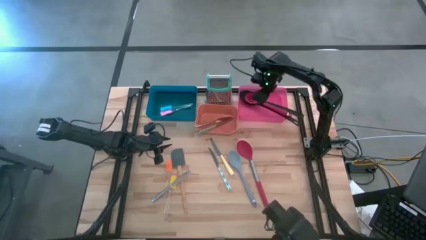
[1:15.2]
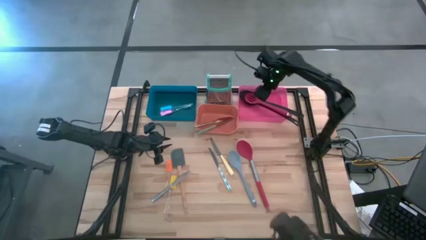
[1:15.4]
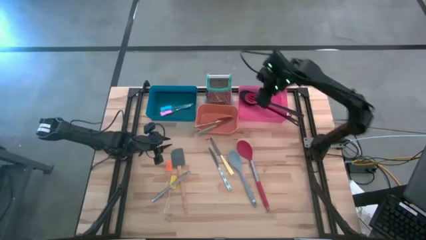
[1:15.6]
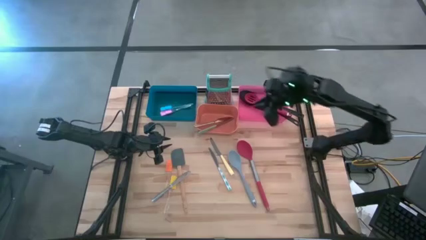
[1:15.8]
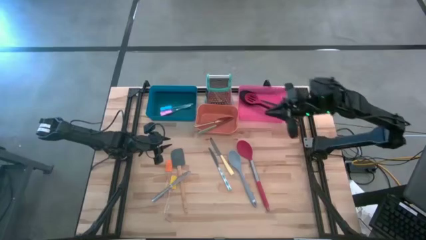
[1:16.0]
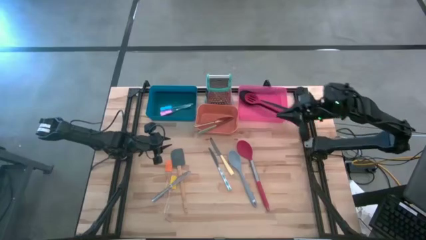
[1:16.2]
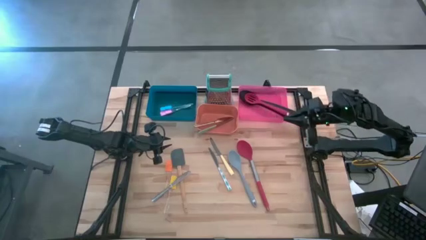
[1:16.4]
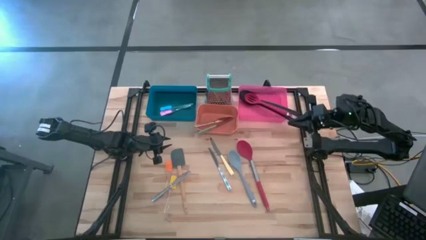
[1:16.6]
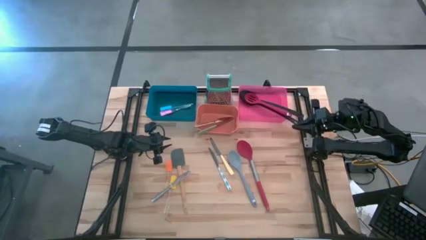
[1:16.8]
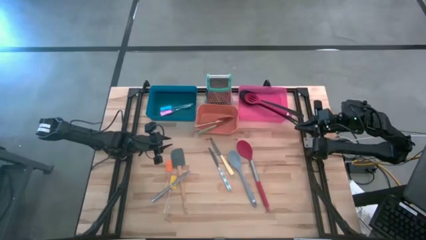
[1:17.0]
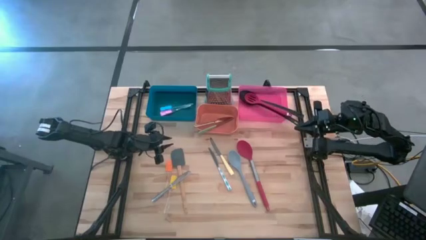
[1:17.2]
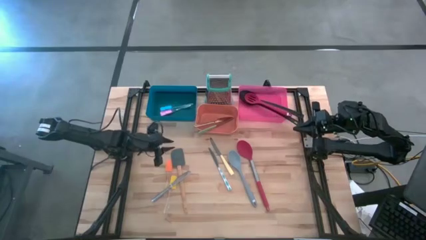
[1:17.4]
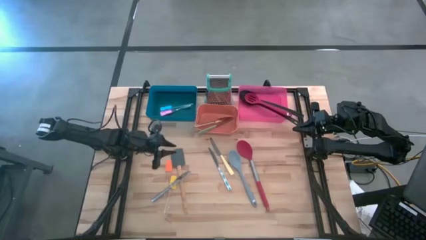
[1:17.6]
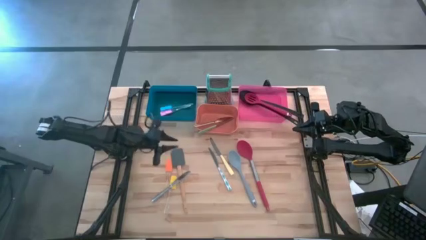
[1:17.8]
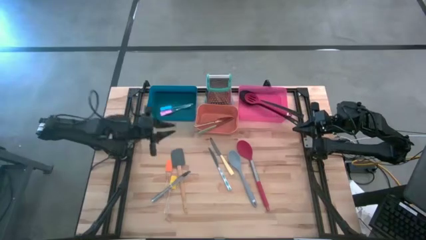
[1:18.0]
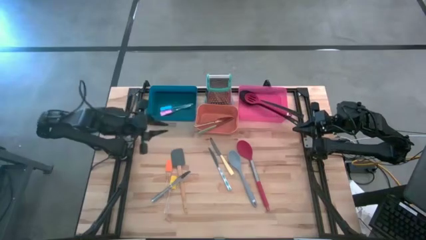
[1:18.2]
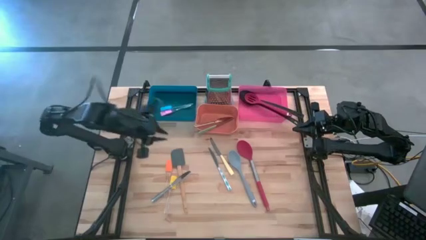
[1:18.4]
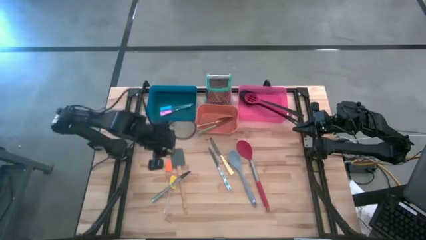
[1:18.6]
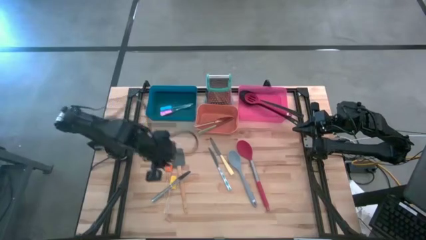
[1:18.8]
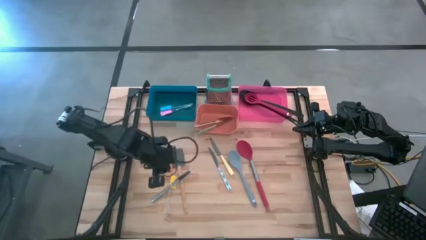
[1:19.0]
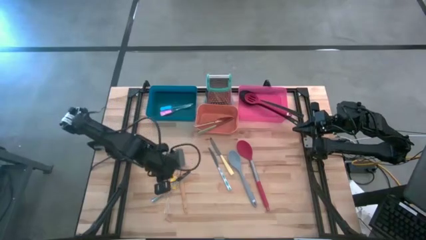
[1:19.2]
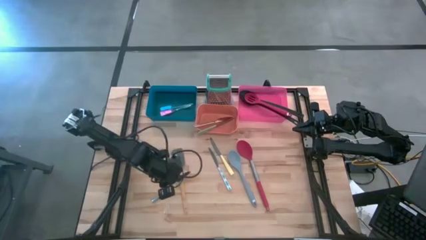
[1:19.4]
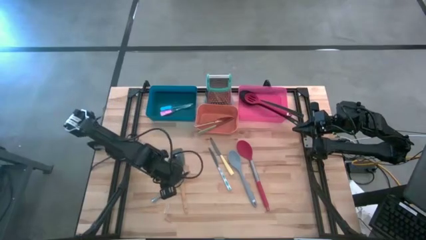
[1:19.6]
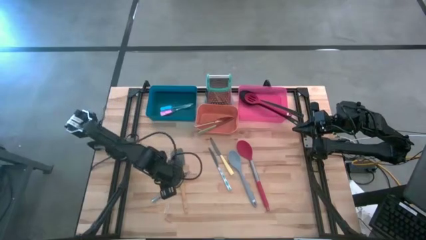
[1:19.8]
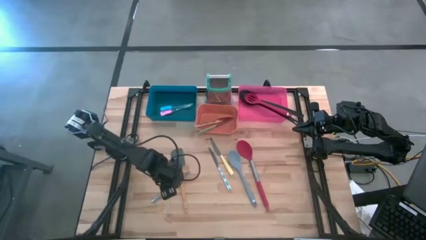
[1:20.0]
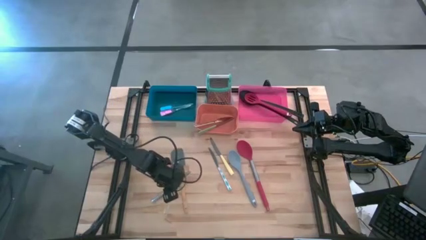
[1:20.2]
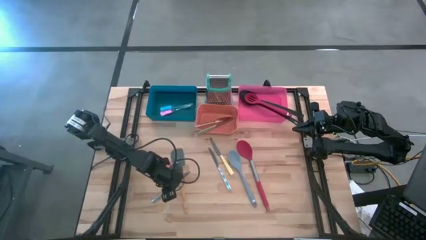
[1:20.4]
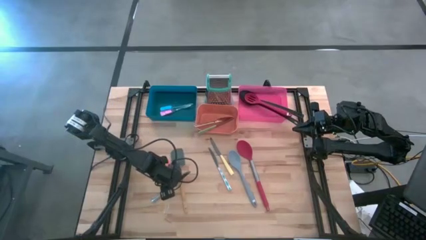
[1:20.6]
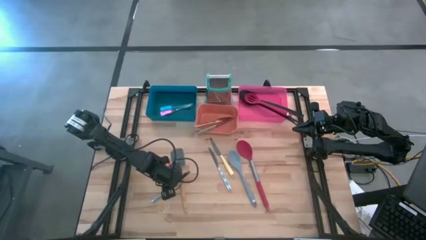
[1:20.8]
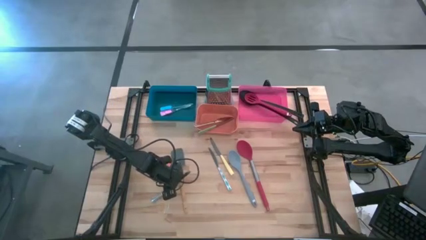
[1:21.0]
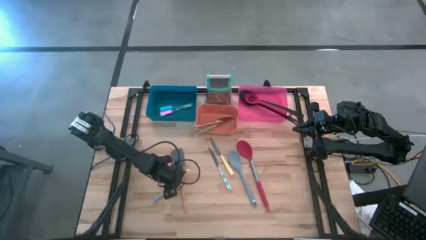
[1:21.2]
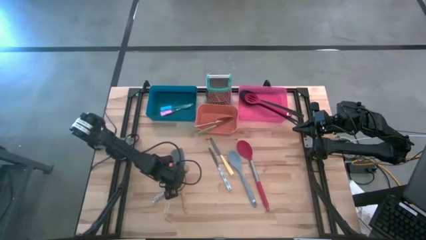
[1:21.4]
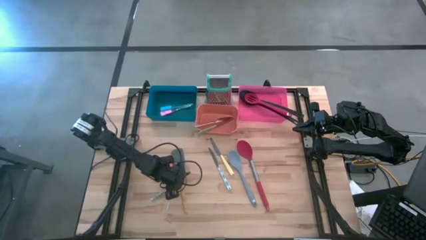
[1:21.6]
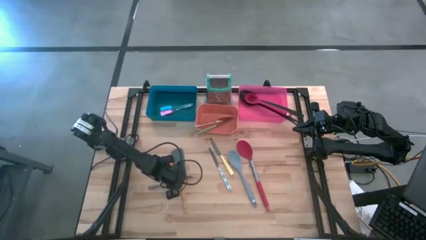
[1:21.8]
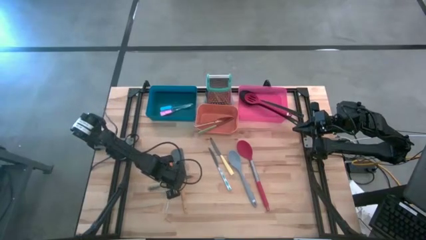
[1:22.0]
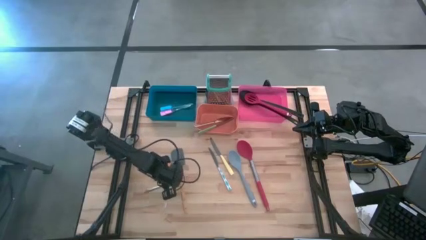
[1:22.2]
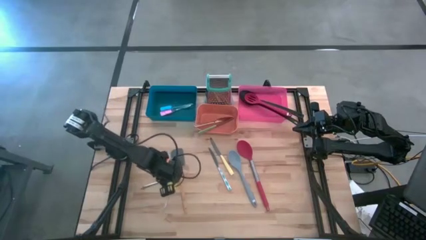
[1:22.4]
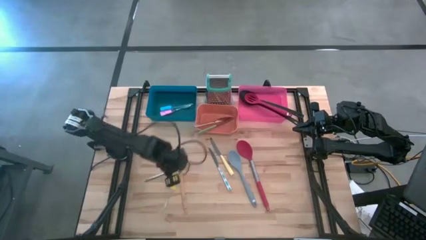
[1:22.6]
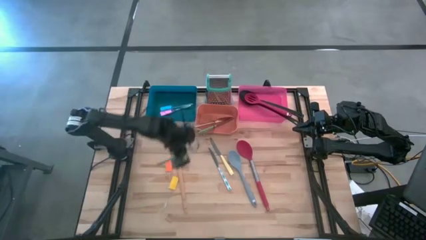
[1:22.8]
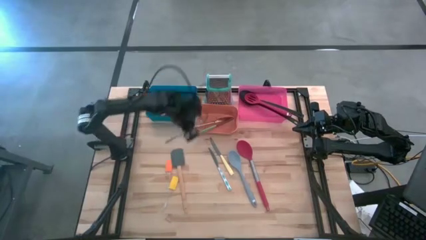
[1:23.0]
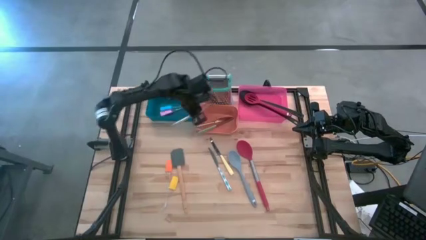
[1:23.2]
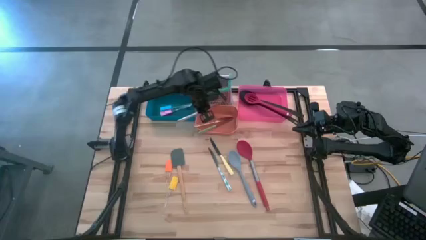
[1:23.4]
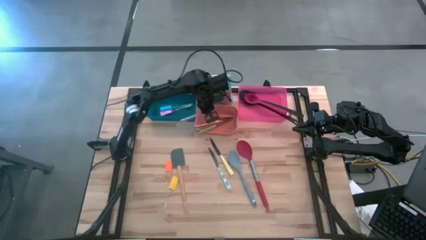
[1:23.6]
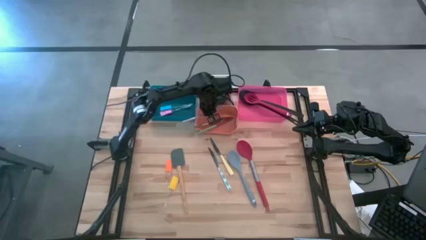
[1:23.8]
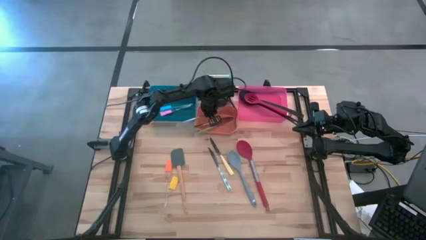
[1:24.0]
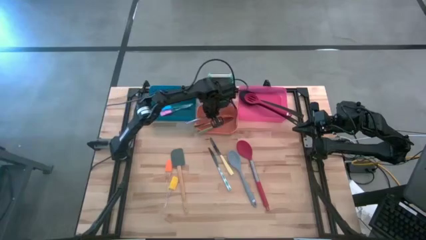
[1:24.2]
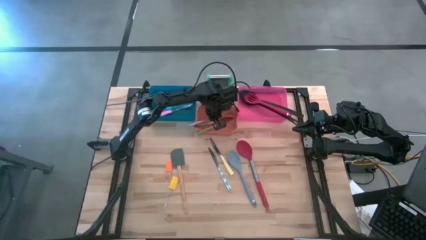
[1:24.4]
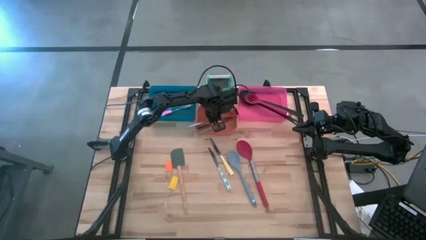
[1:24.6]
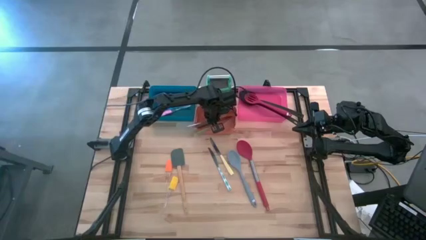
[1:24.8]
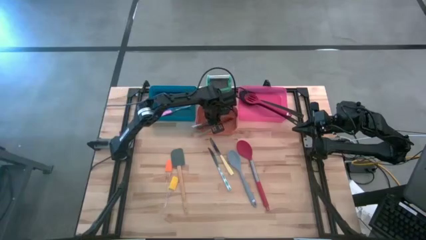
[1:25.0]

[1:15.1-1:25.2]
Task: Pick & Place Kitchen Items
Put the silver table knife into the brown bin

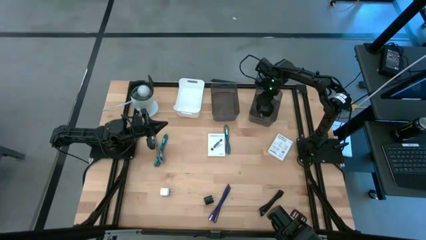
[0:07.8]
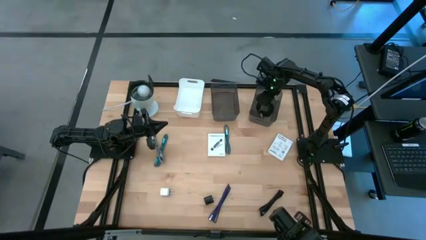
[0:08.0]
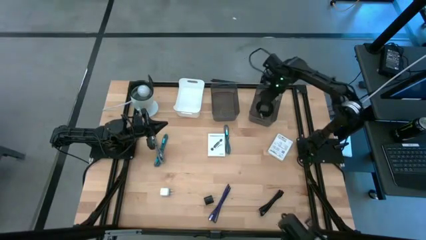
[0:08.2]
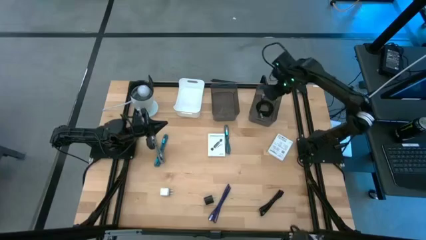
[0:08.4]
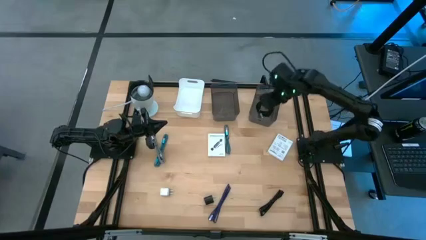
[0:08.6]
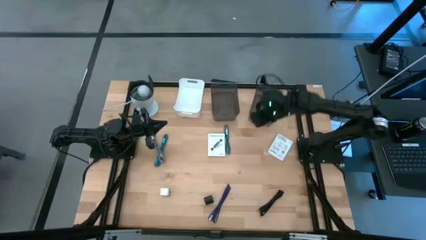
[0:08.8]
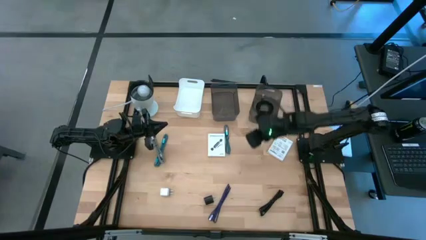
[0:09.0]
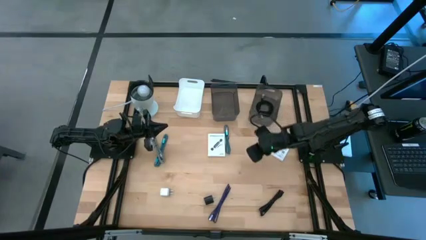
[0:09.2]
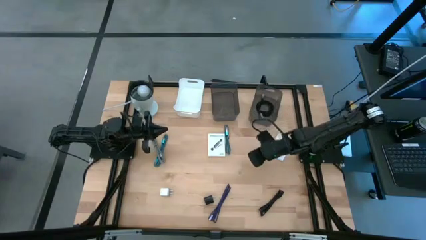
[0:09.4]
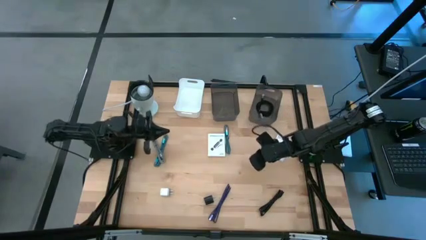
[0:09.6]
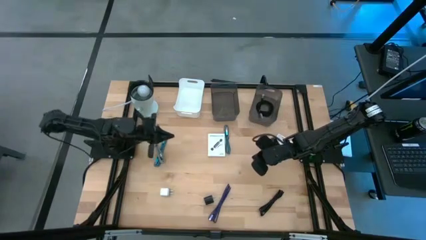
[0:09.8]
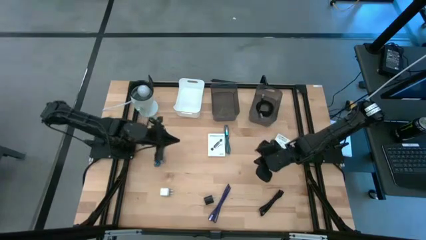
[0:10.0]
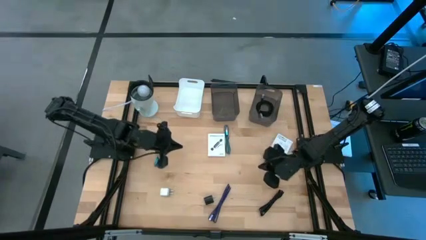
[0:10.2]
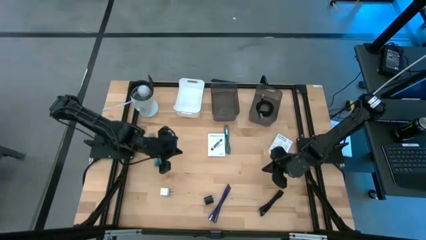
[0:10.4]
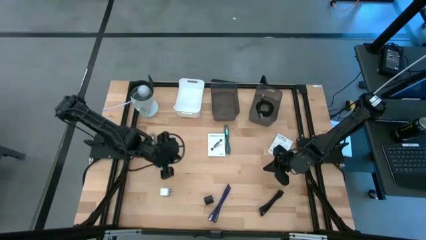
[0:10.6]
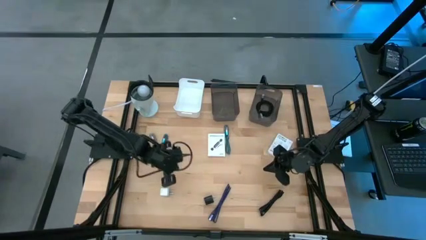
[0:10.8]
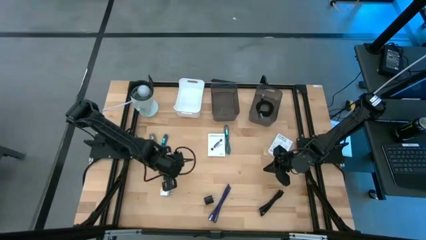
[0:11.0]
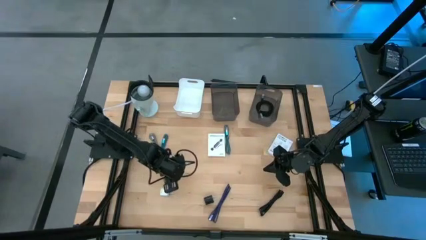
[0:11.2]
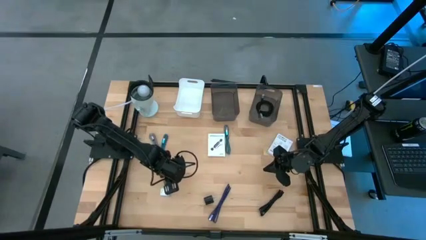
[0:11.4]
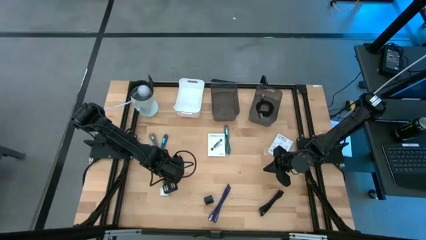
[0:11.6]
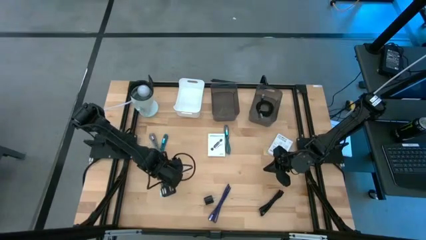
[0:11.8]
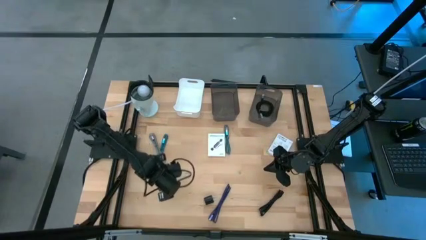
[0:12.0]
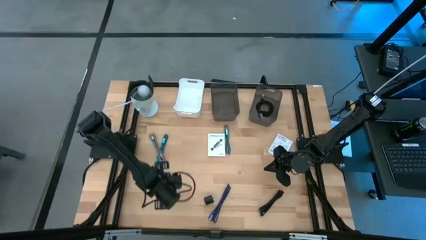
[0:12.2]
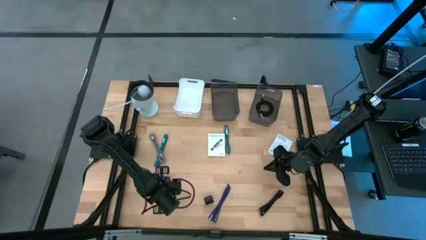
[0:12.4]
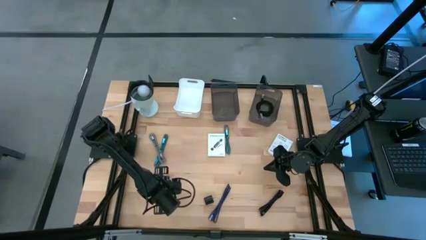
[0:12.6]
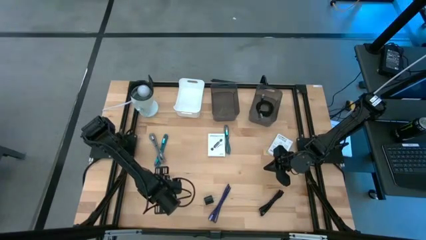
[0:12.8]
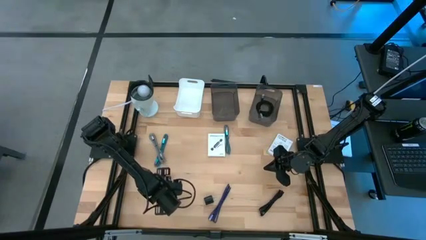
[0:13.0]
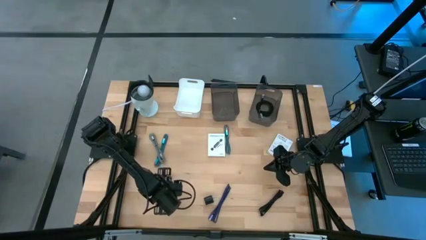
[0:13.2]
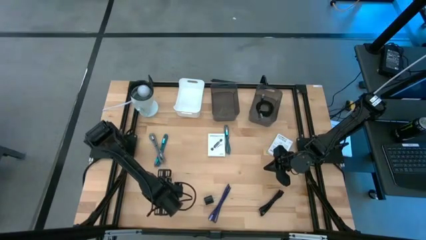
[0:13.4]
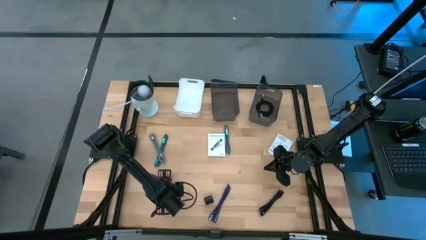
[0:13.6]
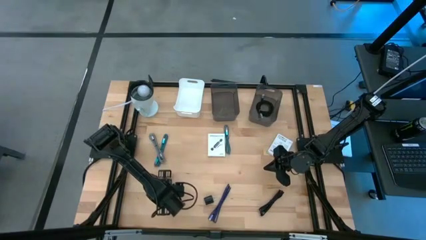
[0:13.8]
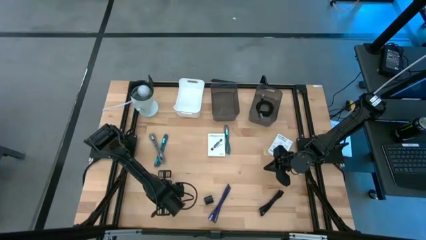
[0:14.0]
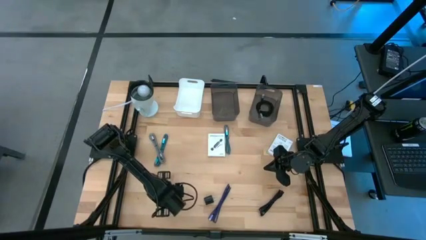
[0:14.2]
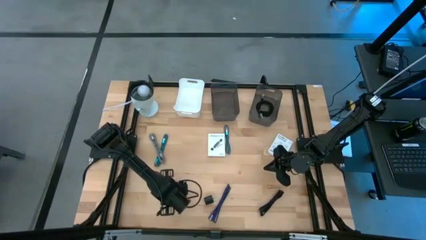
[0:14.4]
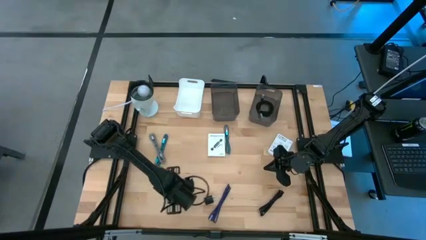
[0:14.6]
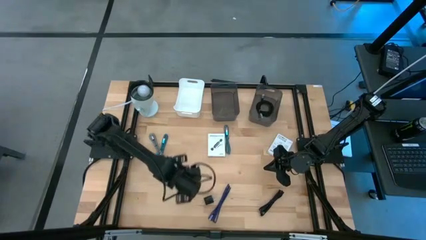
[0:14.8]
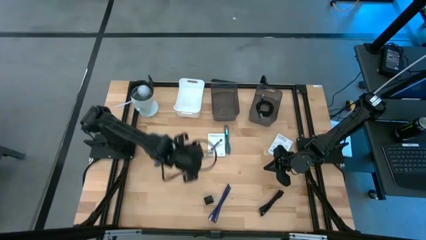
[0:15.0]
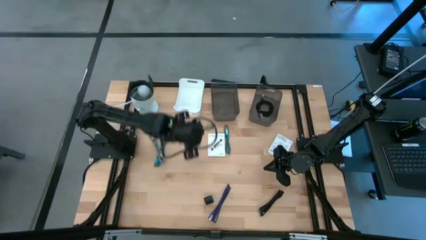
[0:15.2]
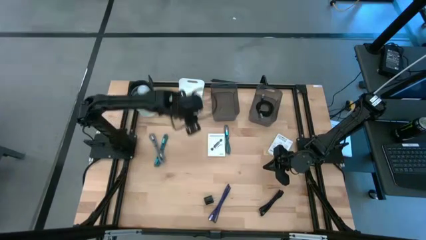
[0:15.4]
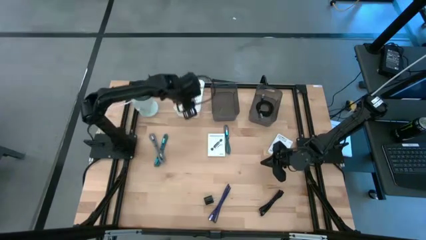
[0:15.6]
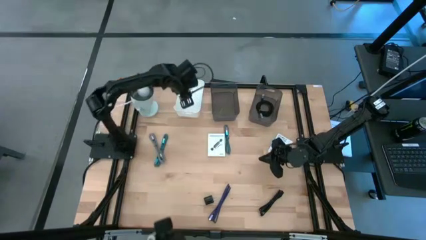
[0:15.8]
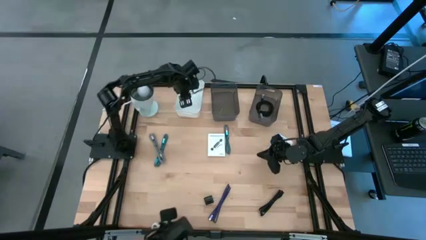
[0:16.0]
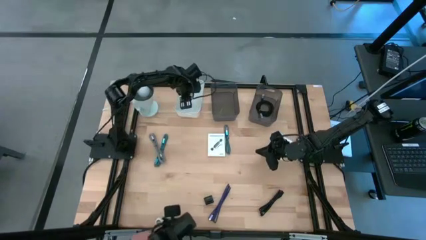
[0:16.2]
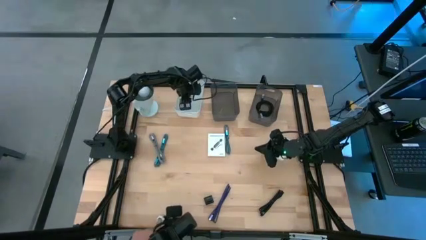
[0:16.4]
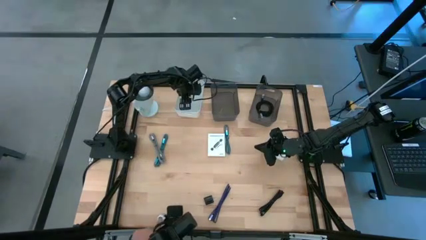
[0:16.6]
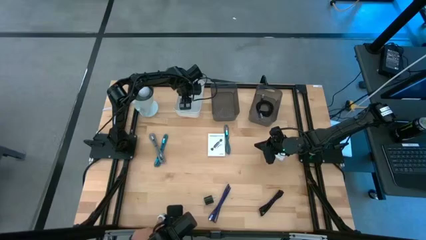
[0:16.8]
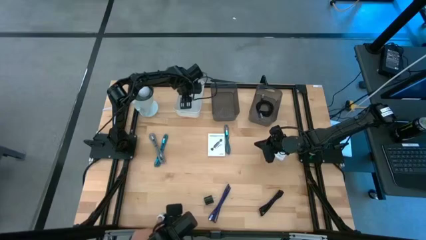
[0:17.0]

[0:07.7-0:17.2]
Task: Pick and place items into bin
Put the white charger adapter into the white bin
